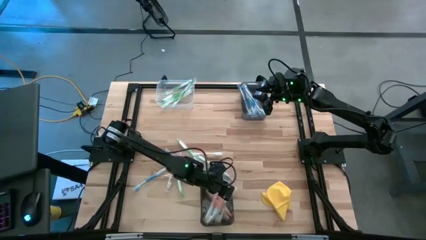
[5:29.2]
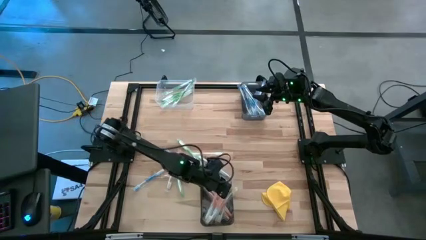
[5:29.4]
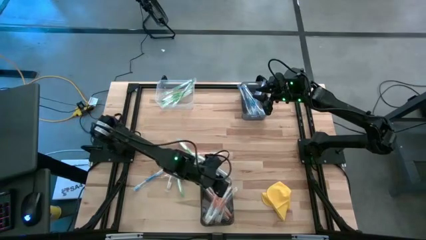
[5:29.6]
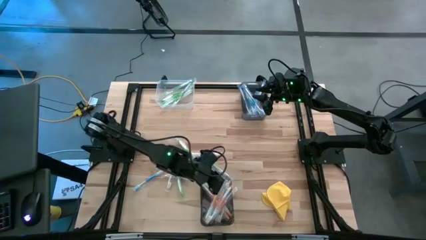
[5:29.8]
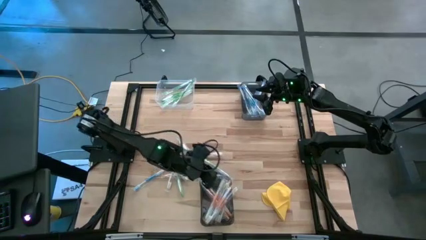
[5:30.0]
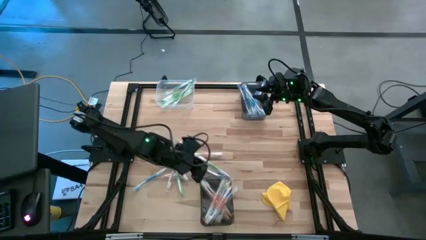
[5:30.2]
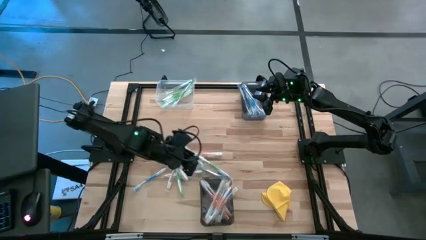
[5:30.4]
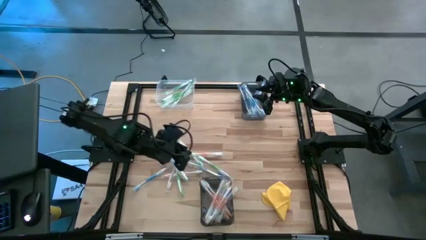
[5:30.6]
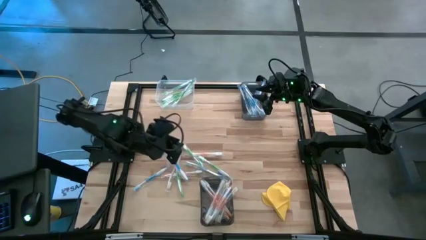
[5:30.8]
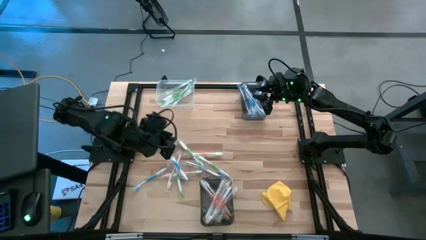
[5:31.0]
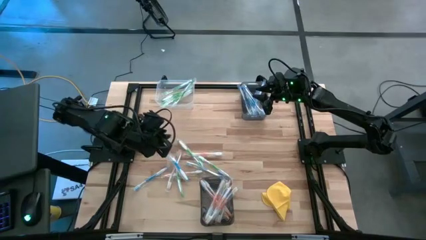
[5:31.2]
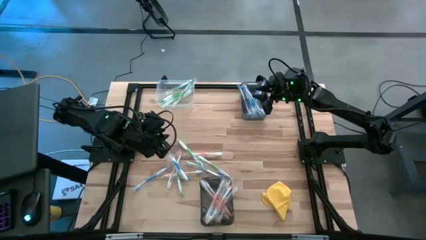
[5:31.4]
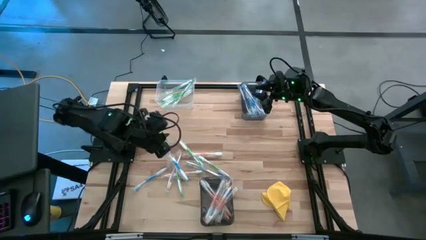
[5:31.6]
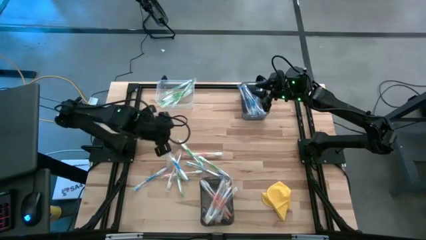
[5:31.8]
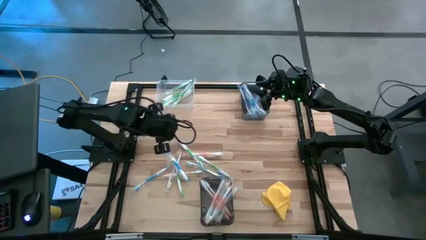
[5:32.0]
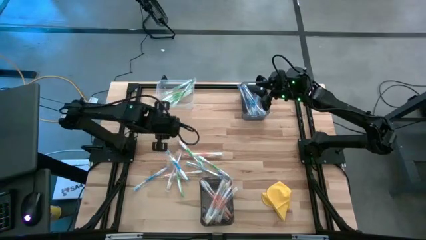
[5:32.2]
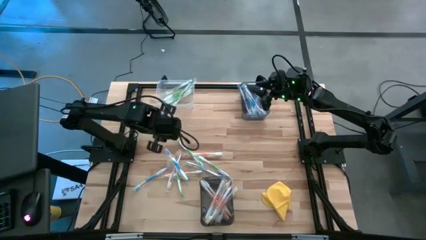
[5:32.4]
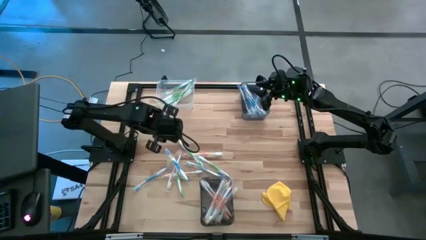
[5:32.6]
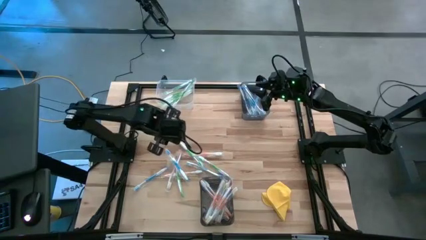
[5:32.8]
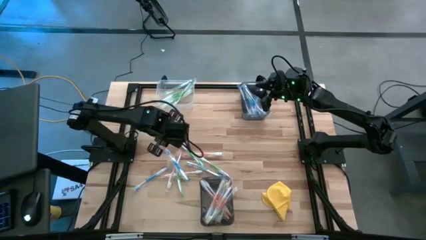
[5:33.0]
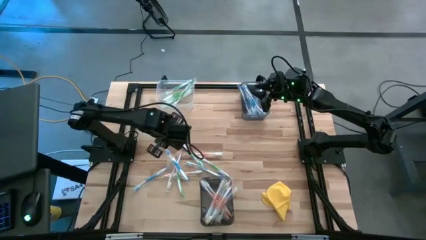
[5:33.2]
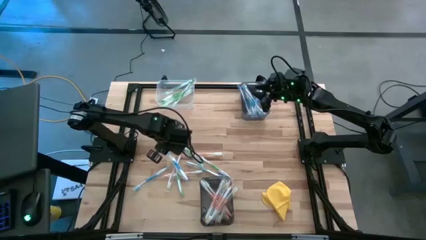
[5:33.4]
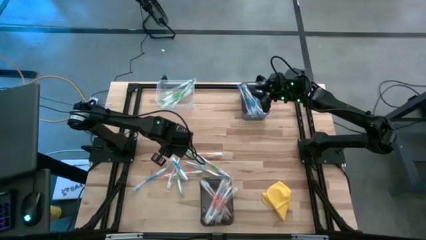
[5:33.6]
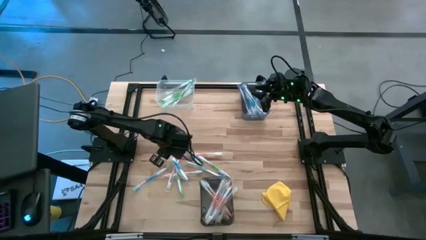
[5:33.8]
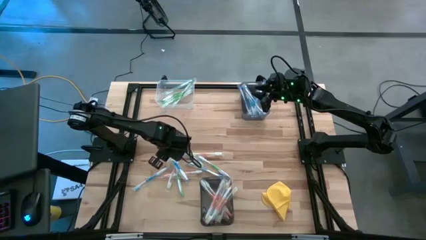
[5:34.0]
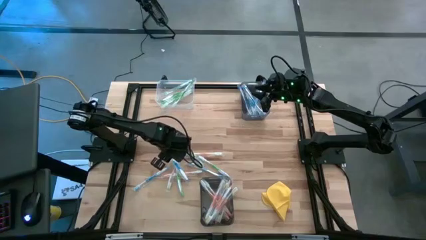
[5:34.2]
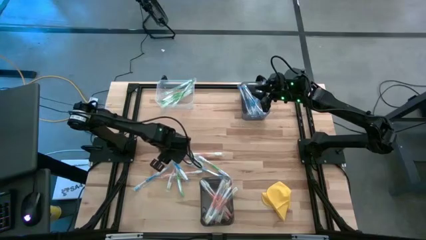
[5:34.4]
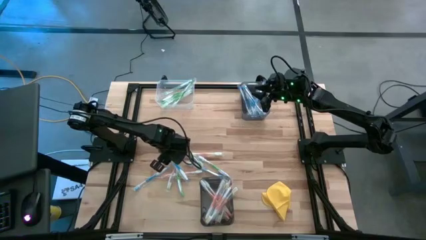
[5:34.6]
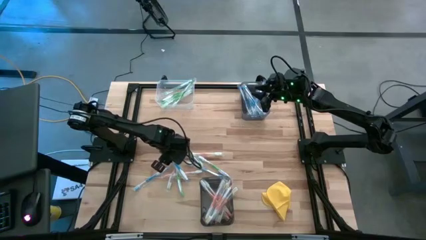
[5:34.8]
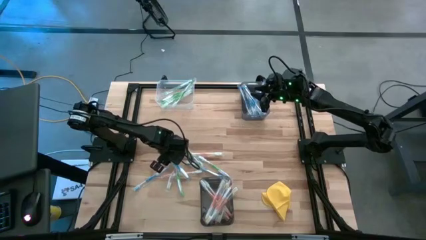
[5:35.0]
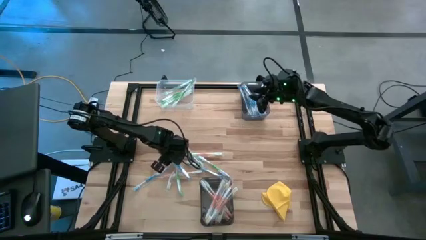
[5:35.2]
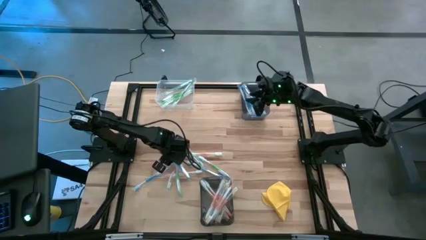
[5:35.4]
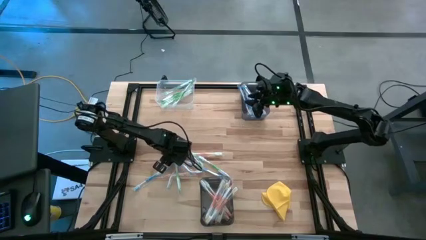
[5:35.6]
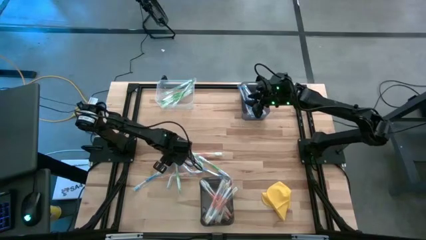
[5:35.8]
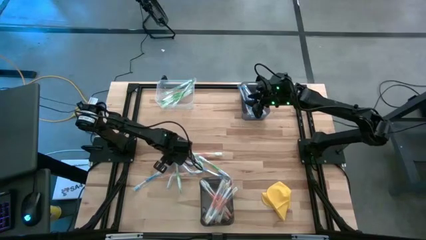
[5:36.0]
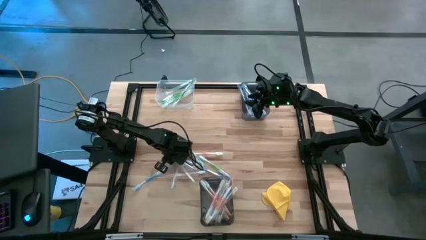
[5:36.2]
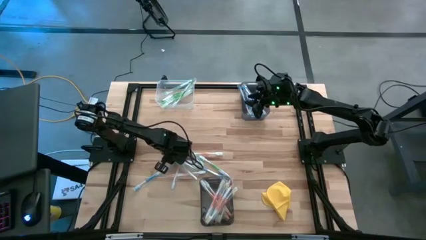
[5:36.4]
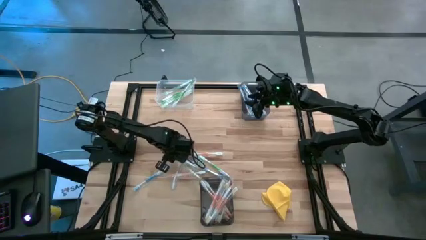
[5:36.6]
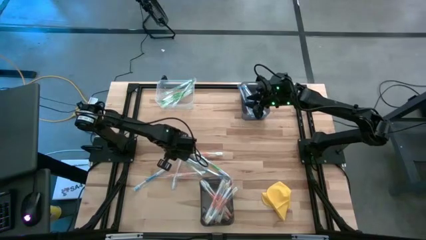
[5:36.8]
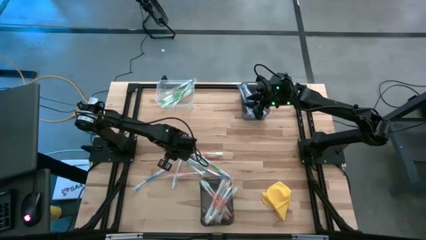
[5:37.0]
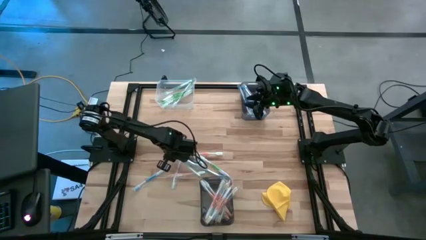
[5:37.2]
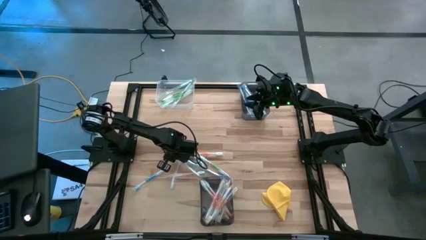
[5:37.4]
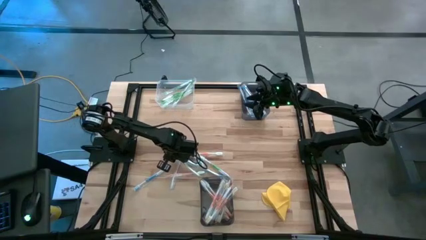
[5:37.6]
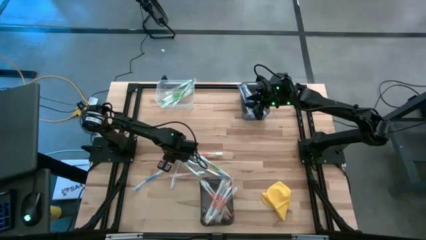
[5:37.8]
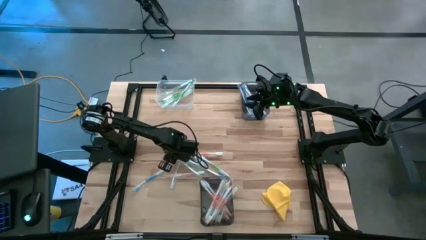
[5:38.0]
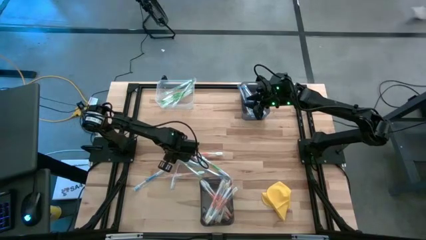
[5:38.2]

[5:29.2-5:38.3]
Task: Pick & Place Toothbrushes
Put the blue toothbrush into the top black bin

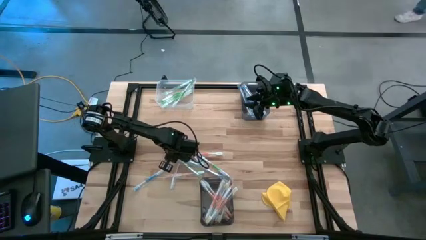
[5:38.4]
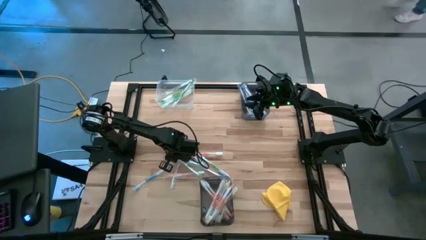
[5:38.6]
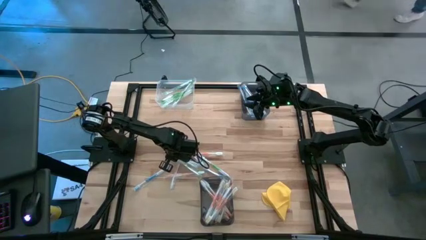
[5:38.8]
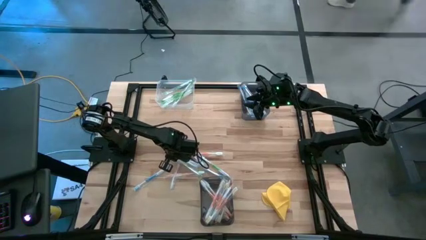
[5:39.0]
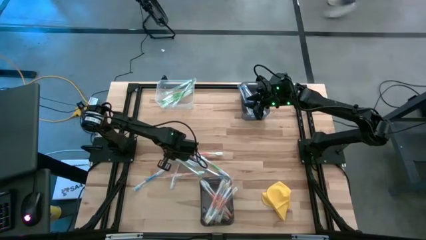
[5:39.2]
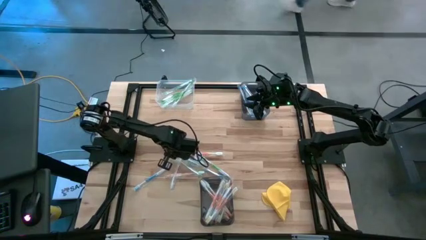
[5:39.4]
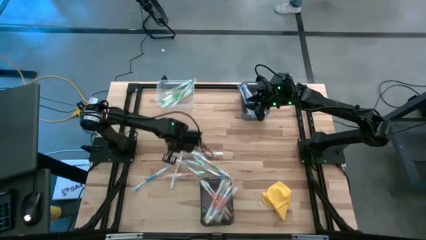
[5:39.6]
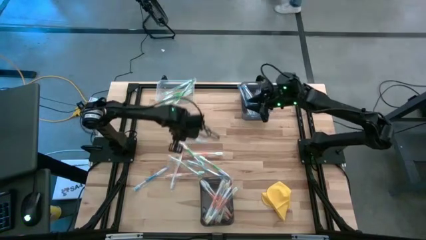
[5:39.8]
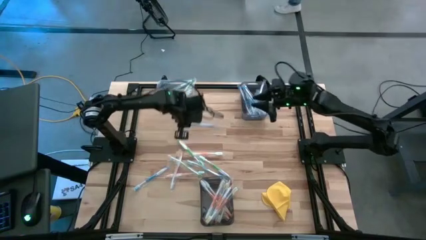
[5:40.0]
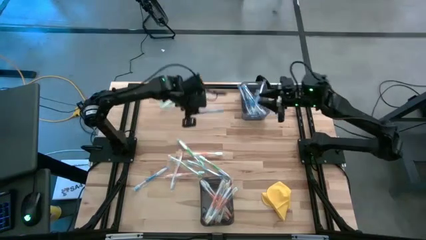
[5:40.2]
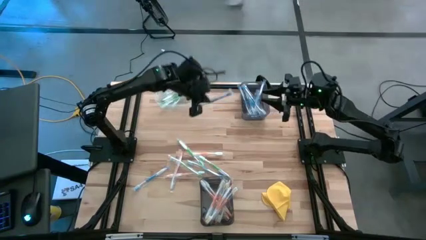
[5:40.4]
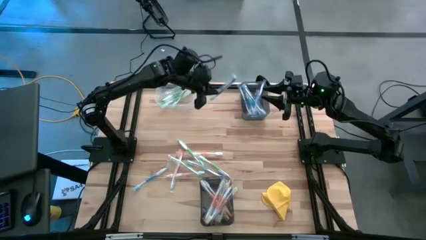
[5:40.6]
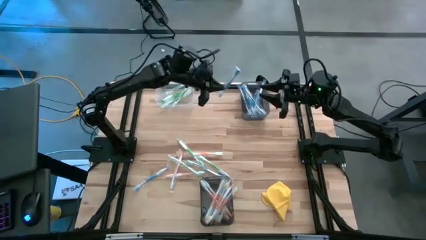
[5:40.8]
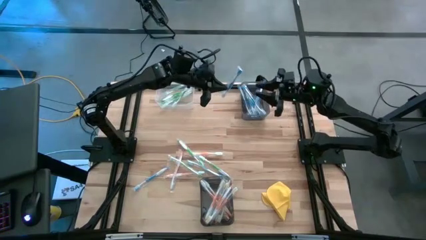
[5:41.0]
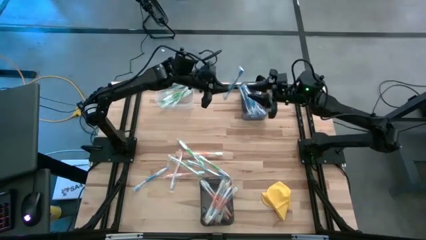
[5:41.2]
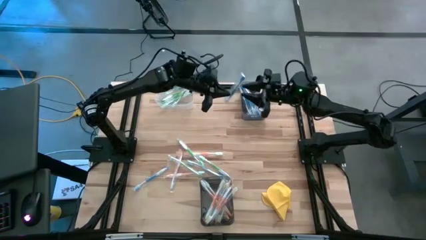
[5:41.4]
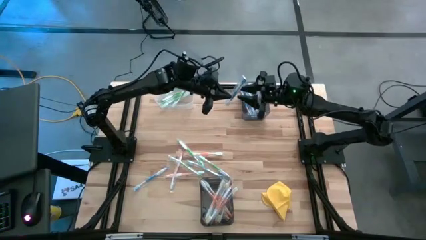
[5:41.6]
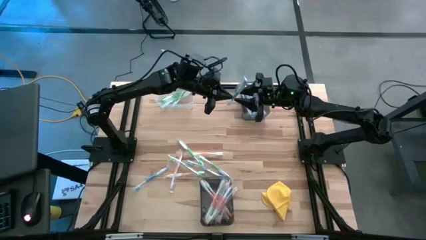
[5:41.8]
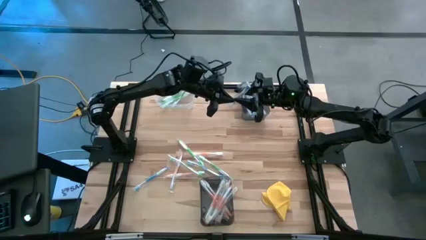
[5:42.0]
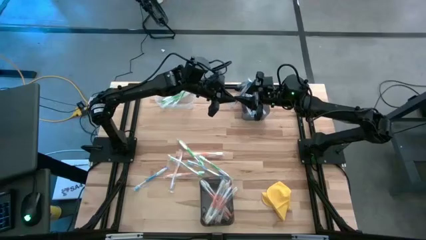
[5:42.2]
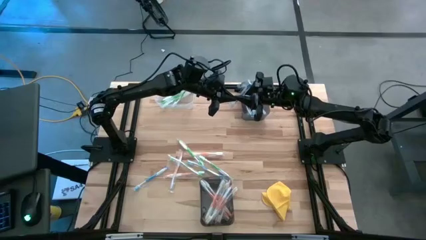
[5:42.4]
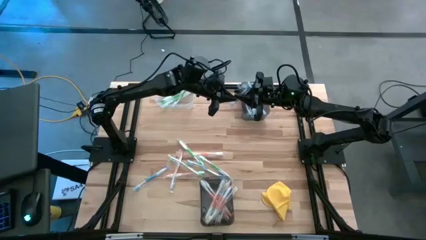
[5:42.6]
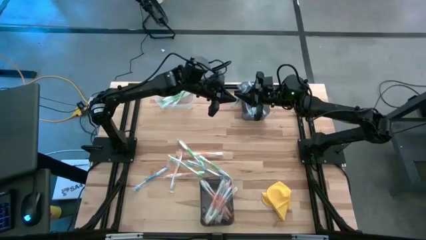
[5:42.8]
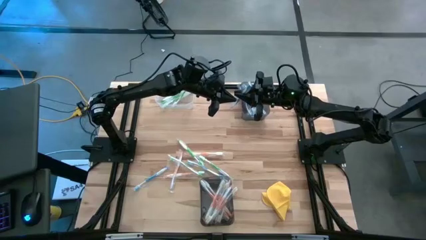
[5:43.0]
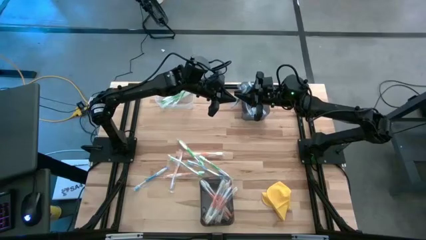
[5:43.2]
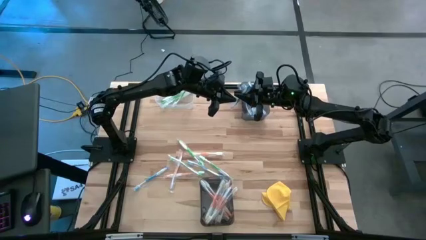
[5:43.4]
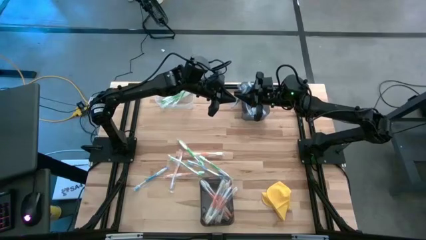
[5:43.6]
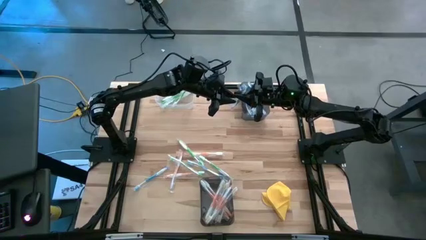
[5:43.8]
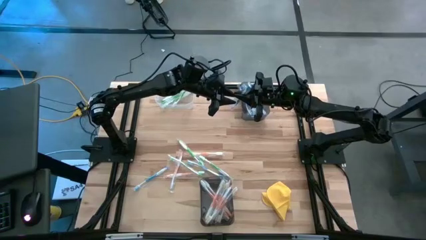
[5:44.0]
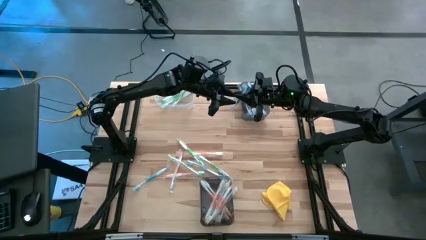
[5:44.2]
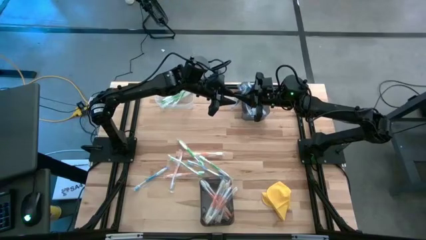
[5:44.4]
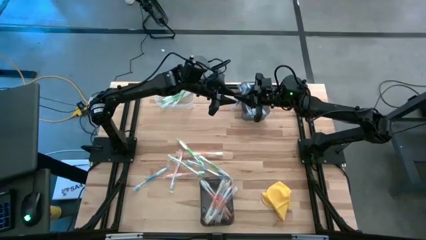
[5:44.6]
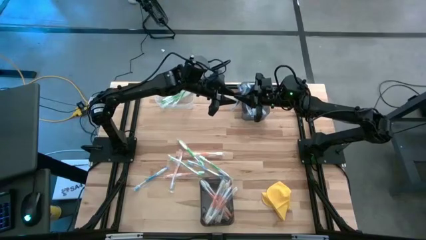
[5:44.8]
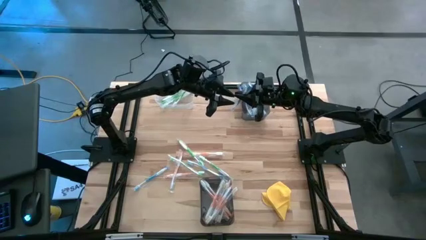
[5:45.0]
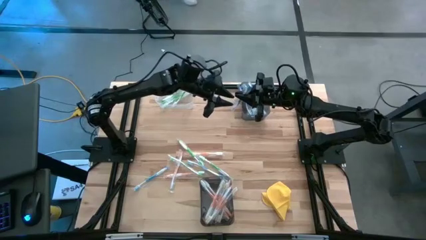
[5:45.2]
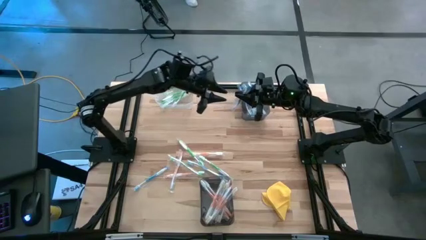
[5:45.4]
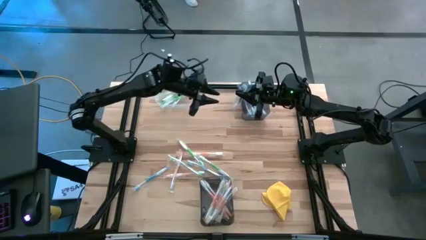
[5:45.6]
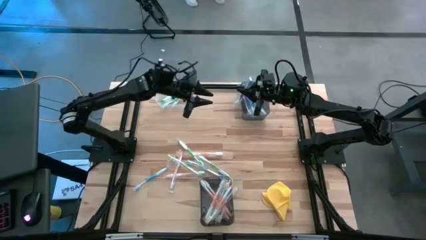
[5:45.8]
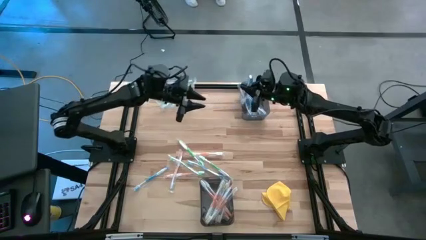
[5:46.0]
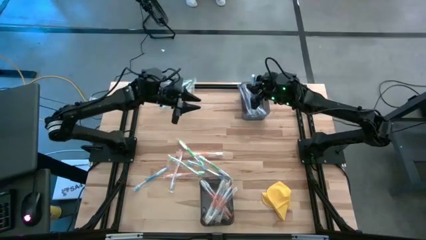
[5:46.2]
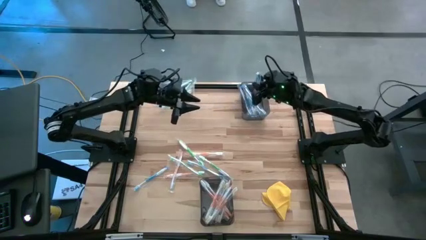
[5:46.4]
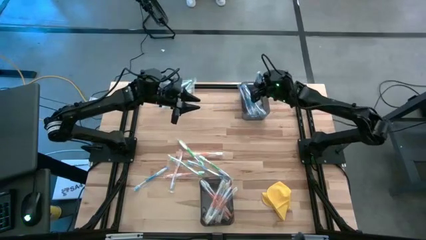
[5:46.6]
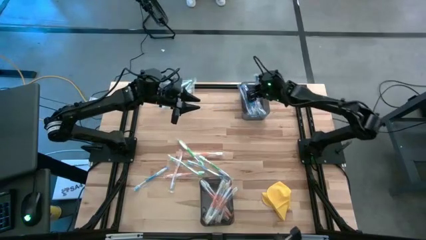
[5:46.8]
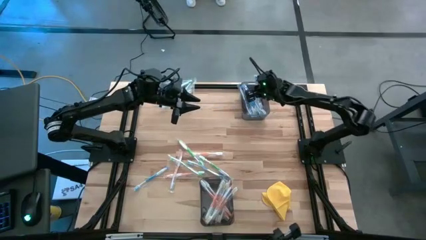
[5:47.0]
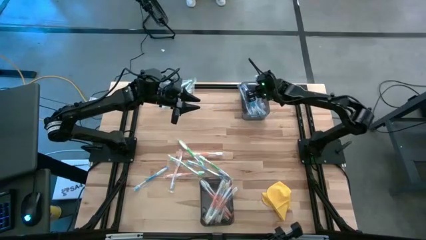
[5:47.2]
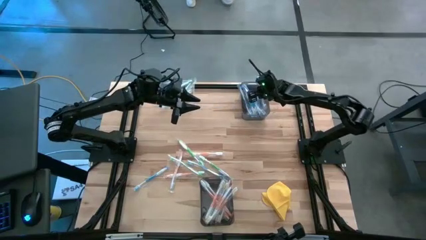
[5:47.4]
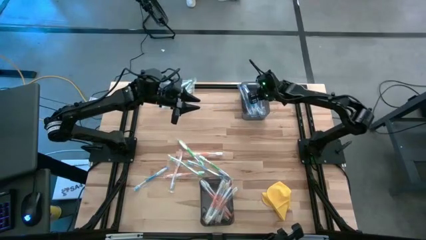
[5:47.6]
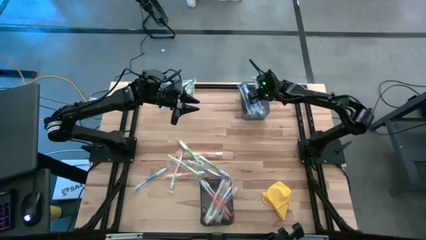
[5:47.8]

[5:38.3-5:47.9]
Put the blue toothbrush into the top black bin
